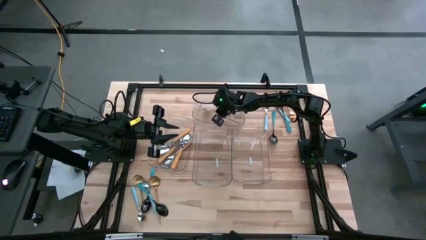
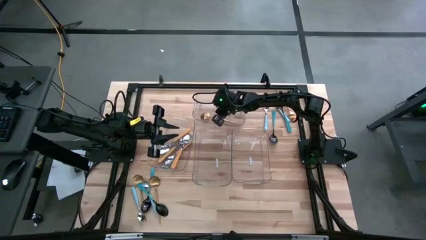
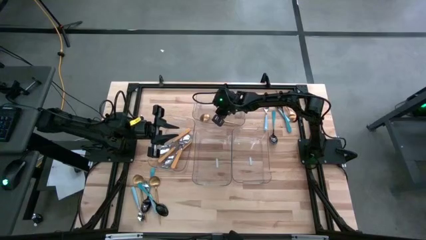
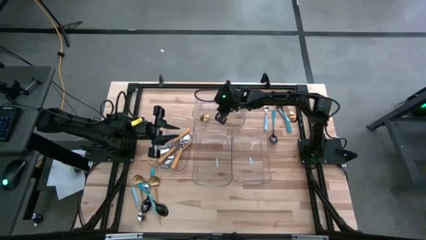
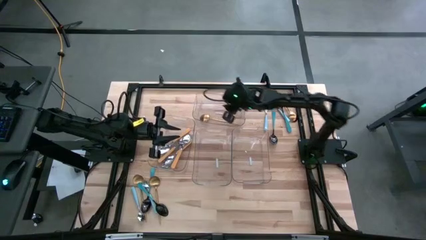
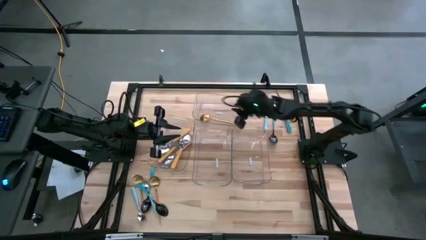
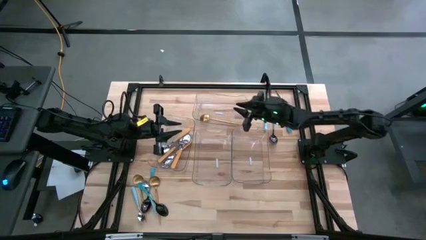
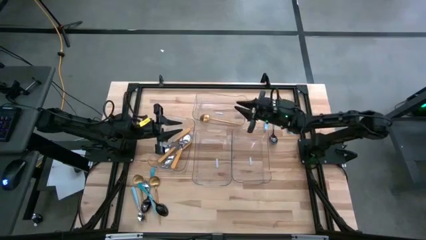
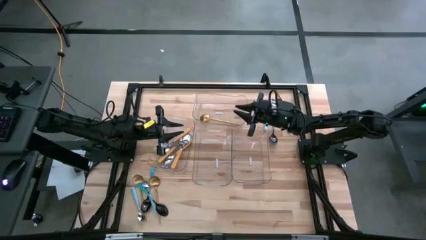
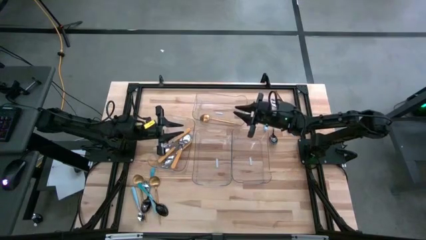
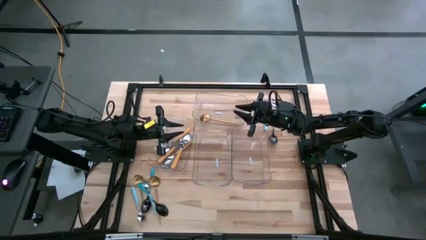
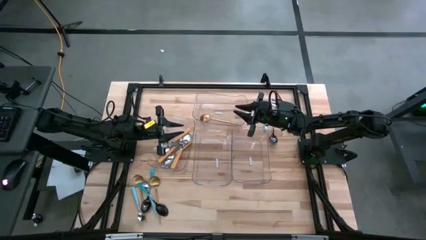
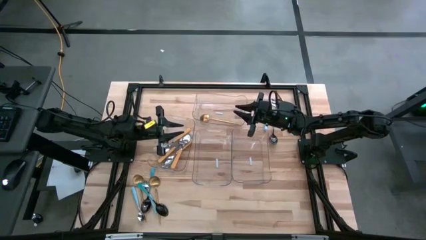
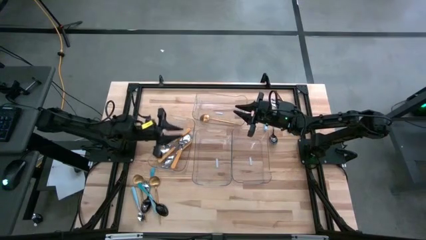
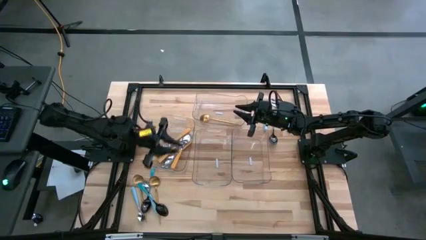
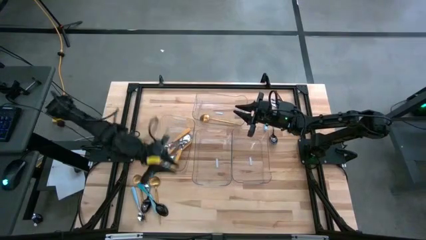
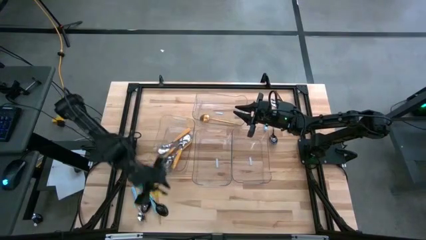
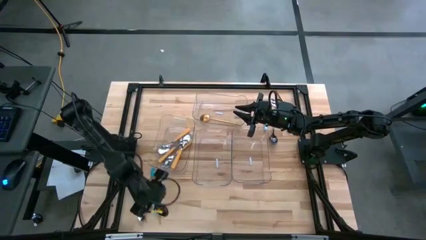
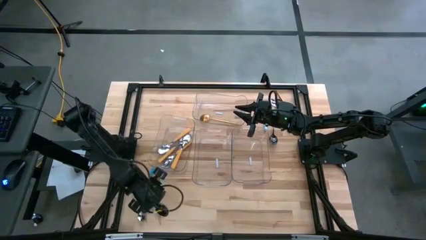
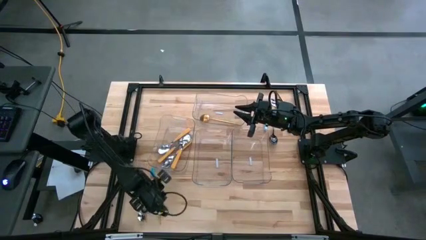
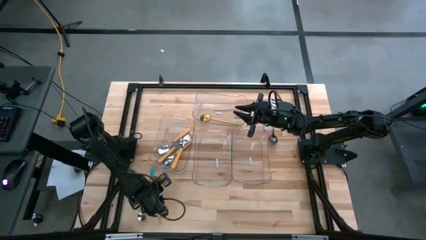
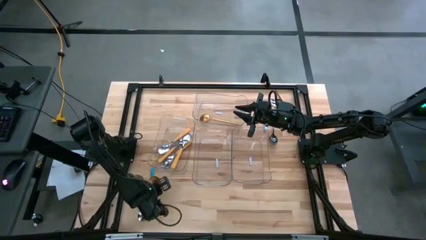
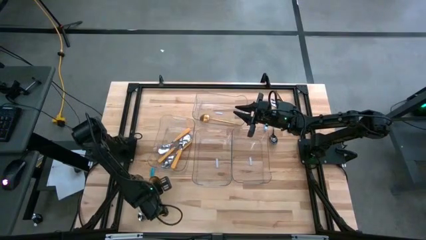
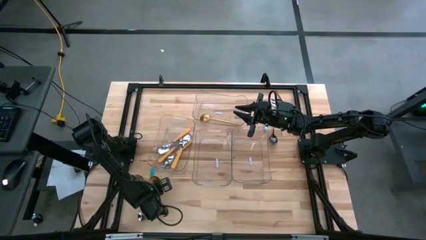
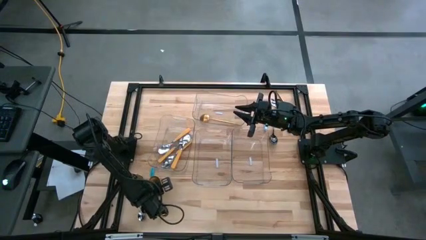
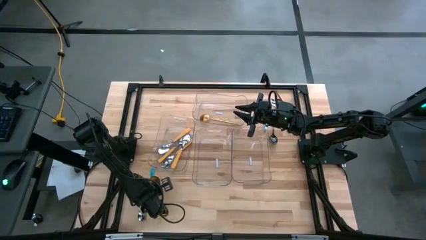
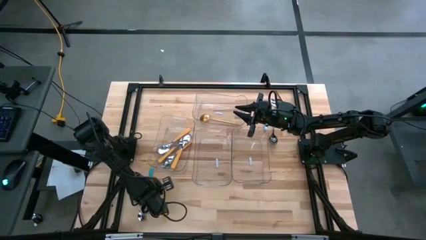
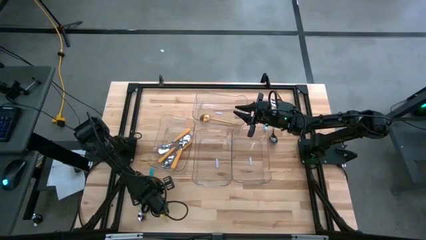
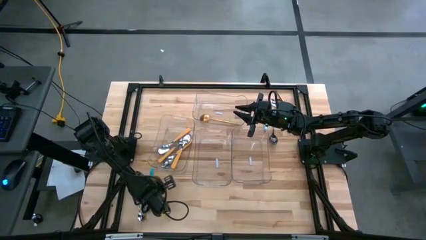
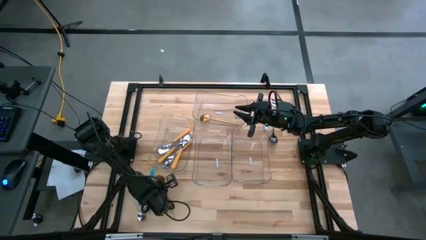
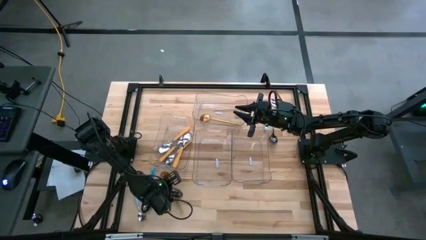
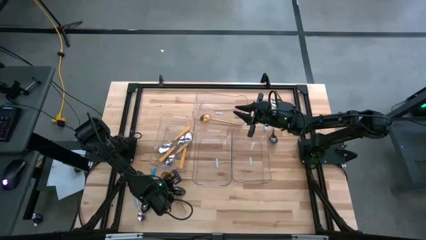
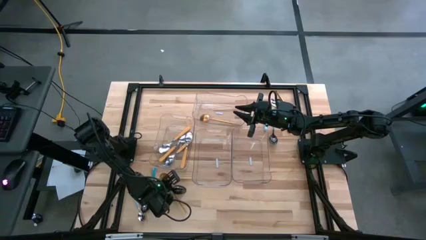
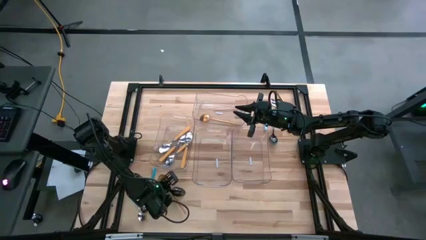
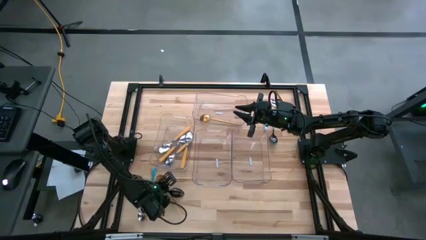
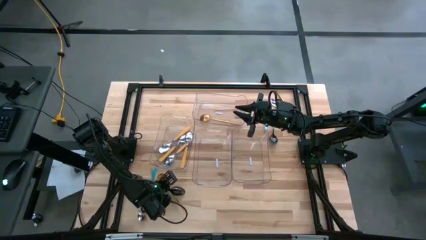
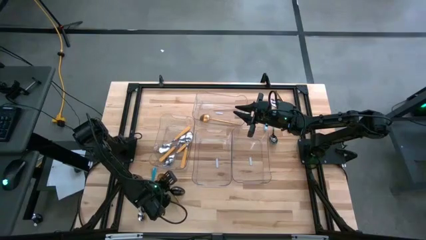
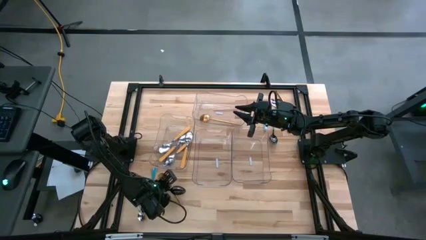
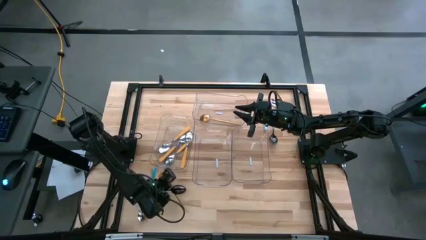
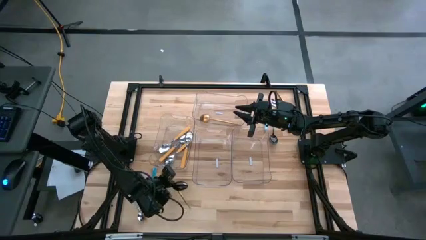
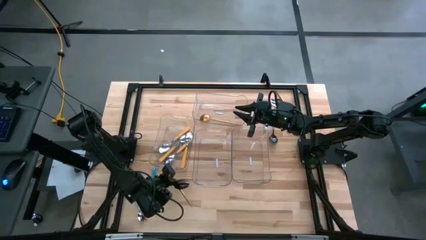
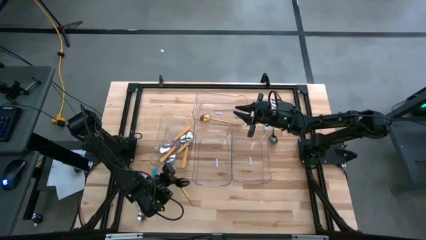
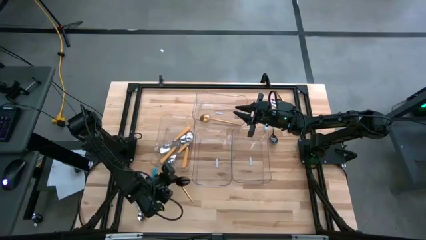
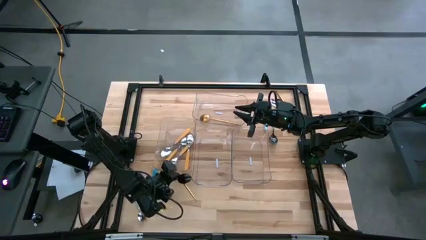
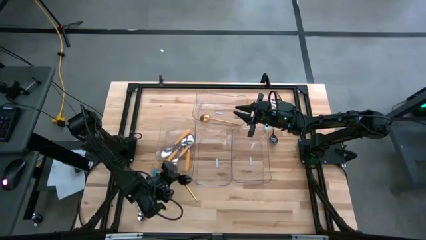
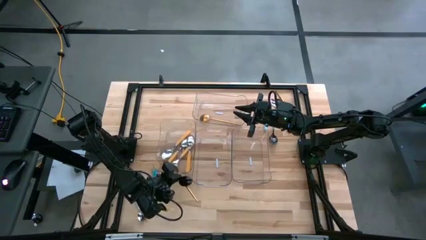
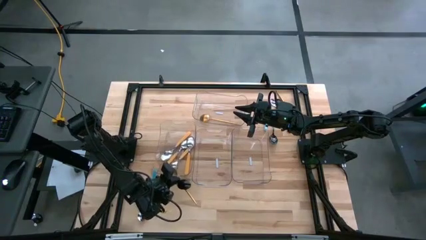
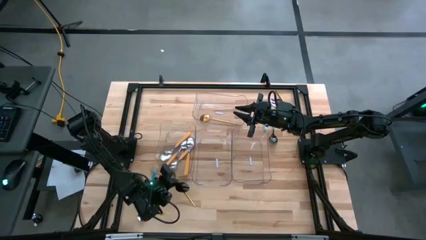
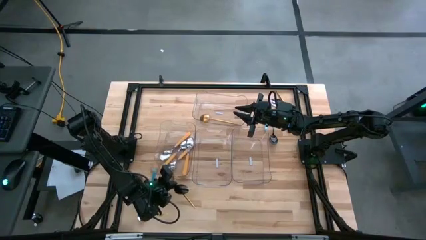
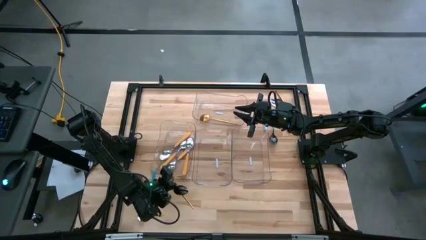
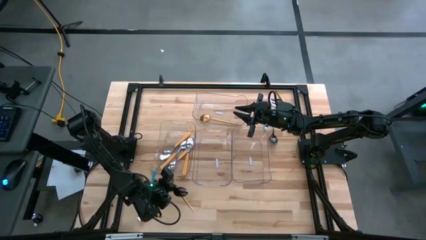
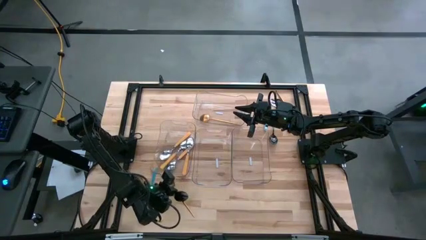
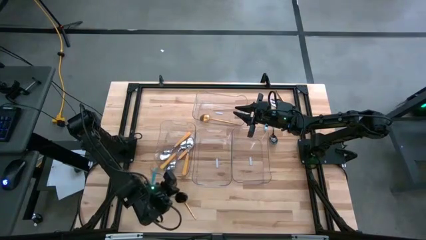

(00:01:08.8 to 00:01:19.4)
Task: Sort silverware by color (type)
Put the gold spoon into the top transparent bin

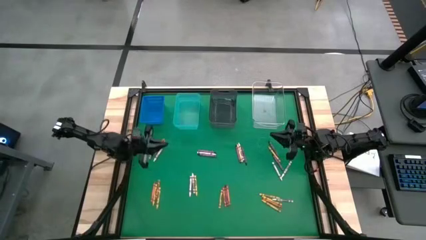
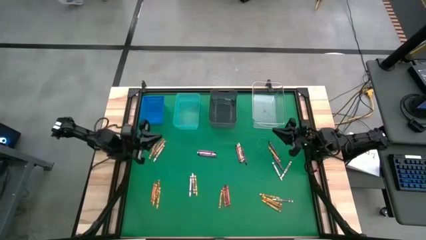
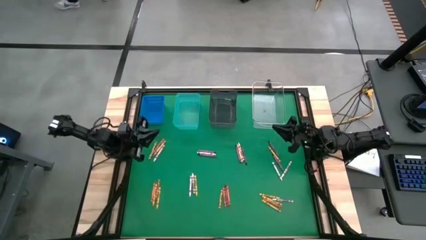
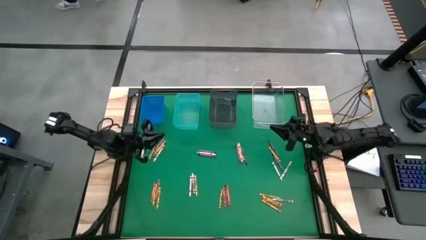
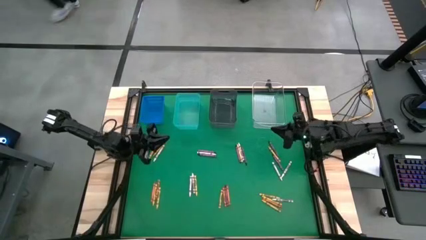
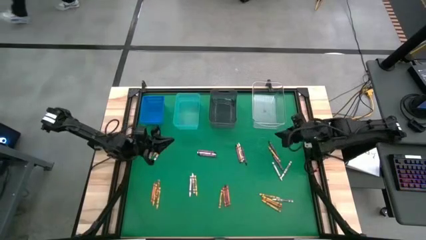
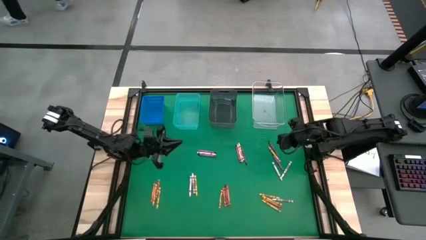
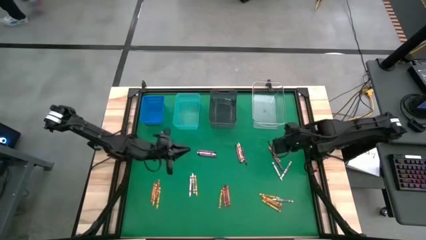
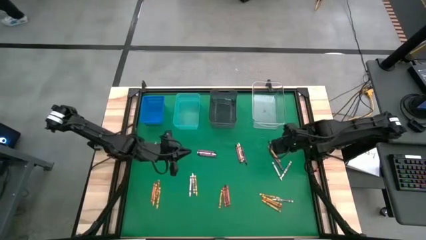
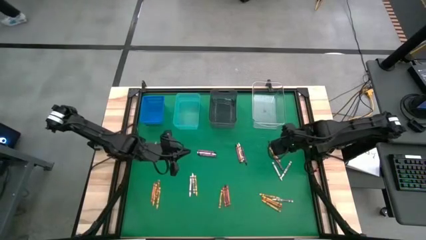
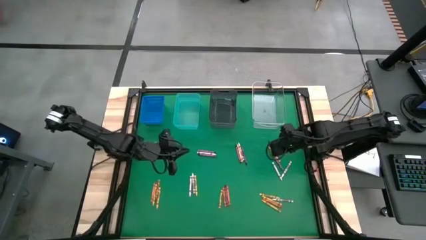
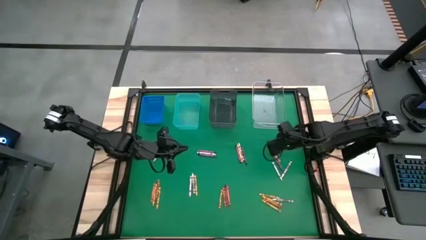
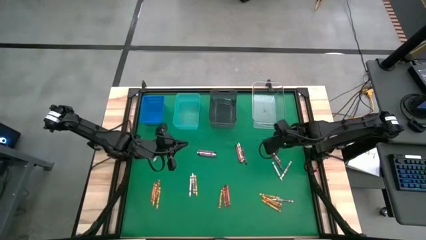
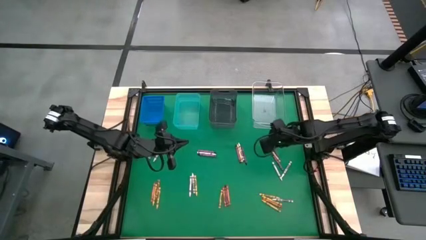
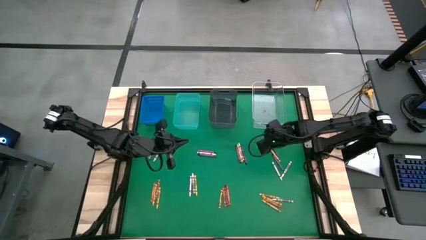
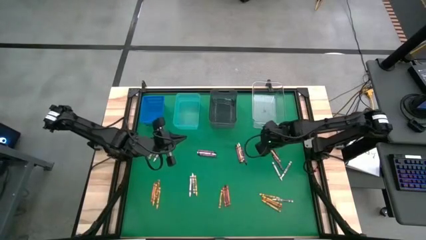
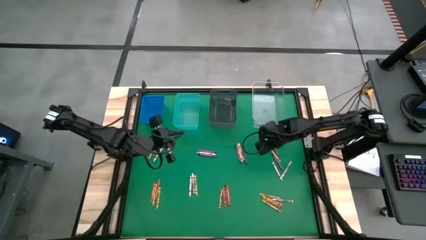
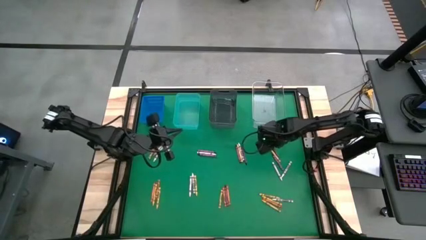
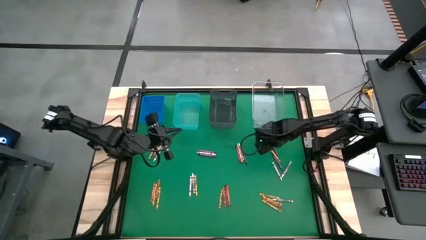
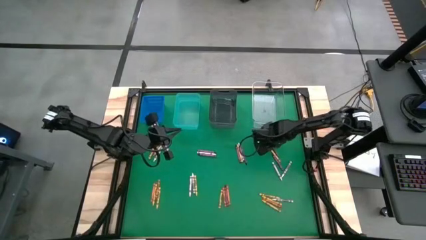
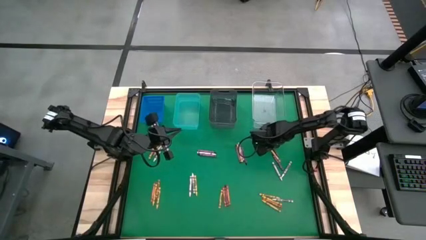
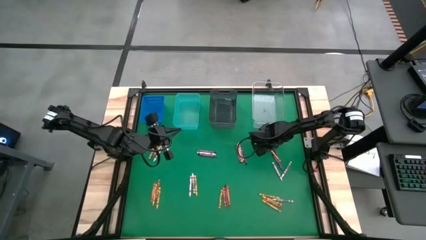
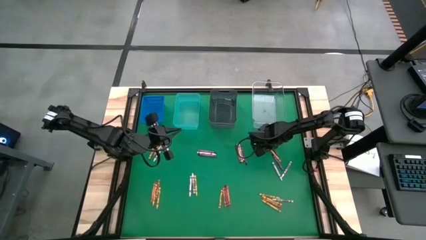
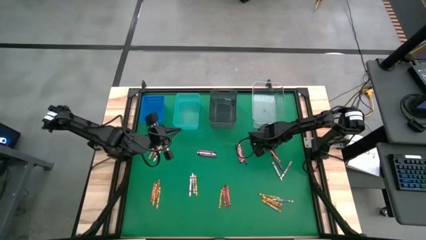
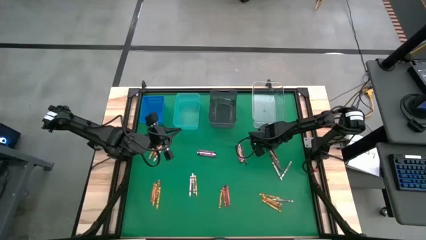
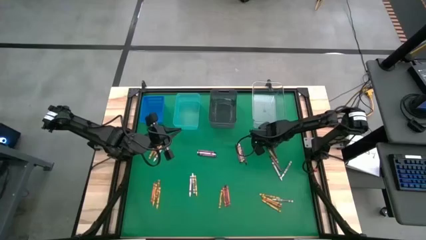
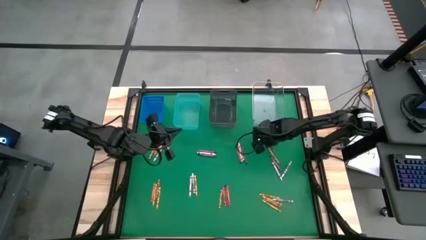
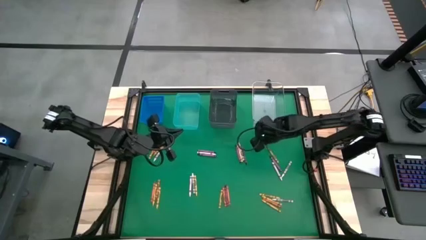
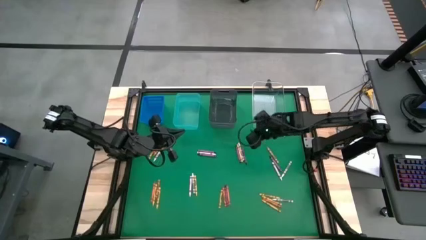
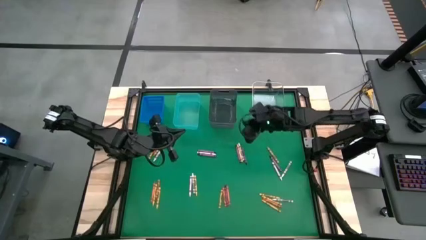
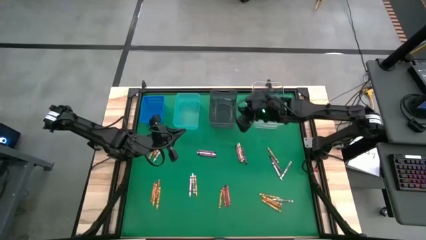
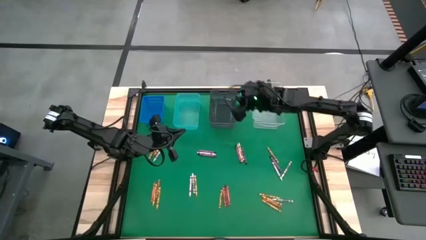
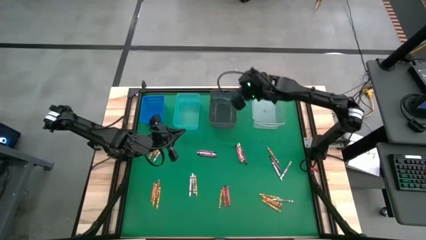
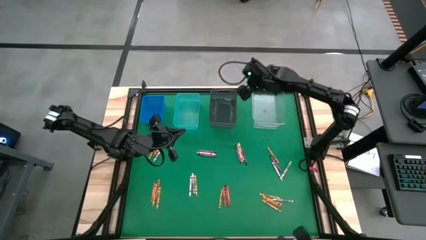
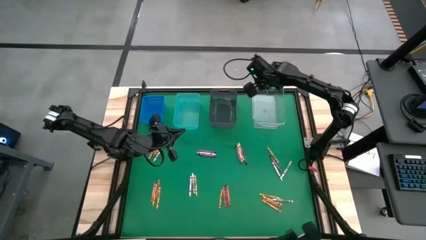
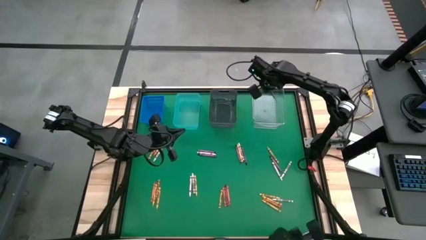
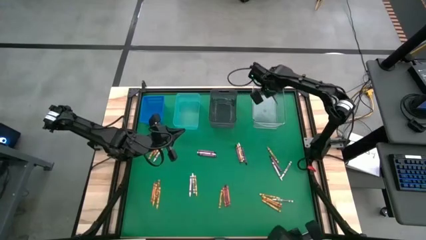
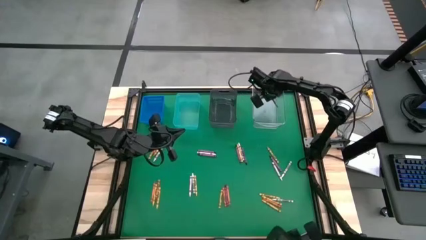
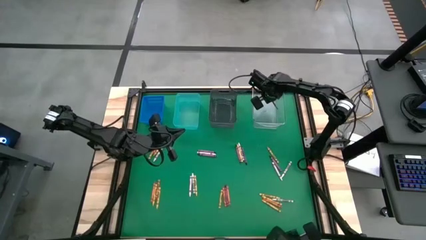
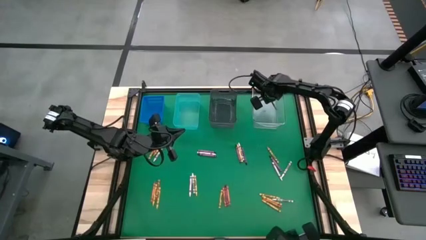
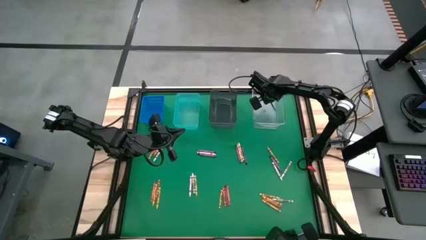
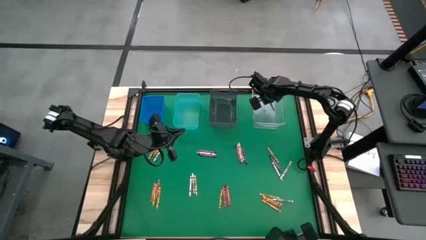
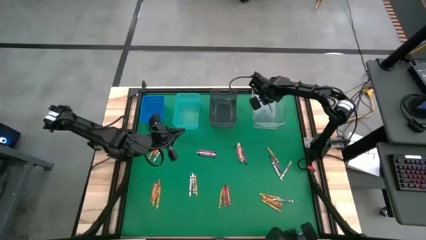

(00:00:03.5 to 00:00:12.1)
Task: Sort crayons
Put the violet crayon into the transparent bin
